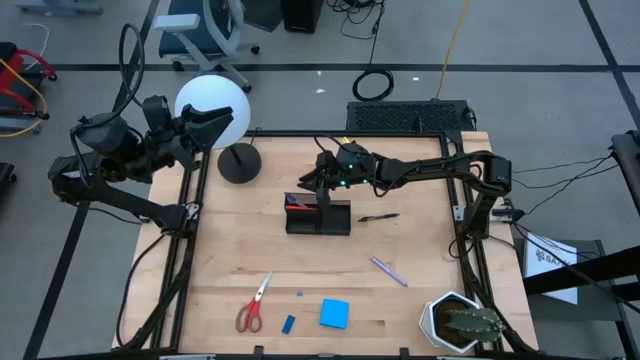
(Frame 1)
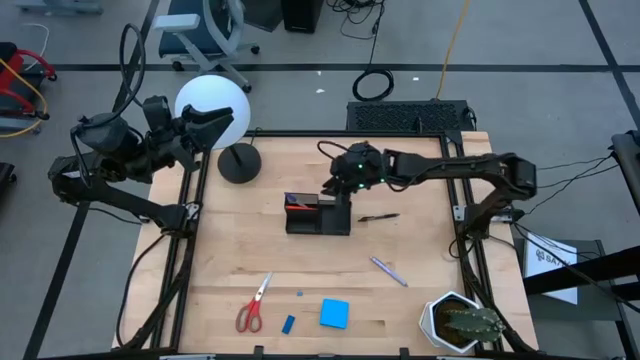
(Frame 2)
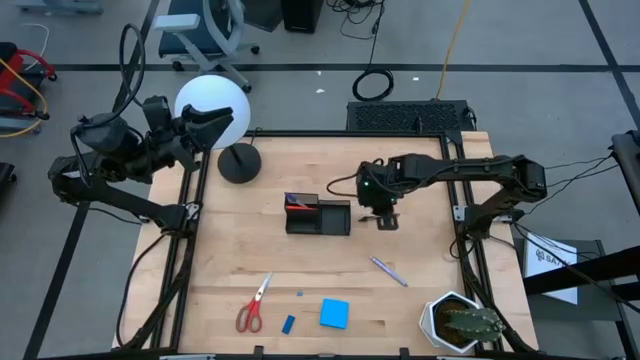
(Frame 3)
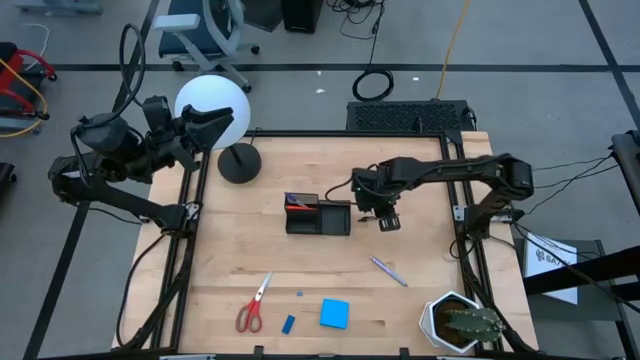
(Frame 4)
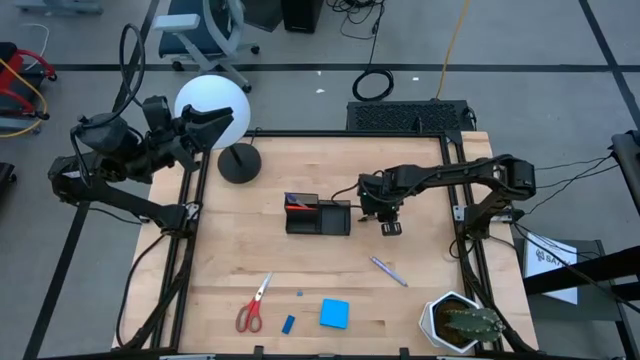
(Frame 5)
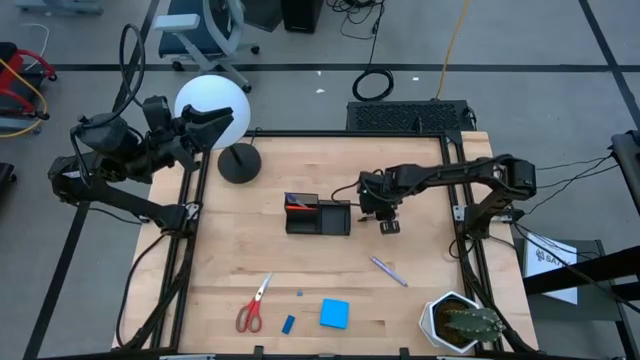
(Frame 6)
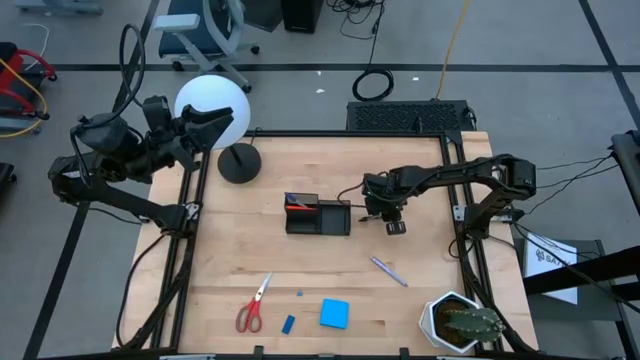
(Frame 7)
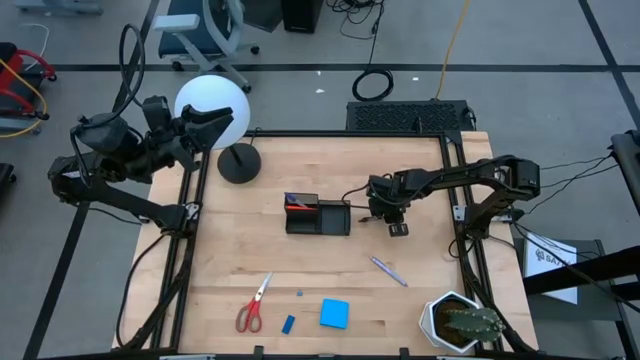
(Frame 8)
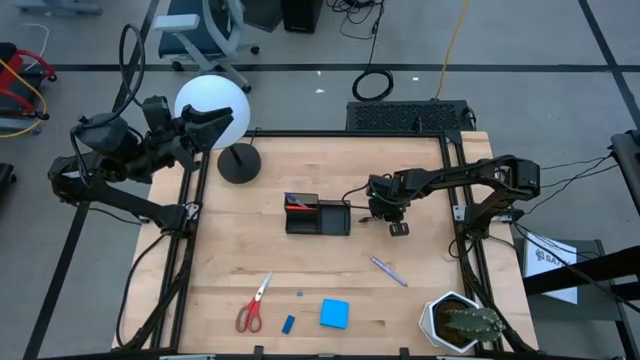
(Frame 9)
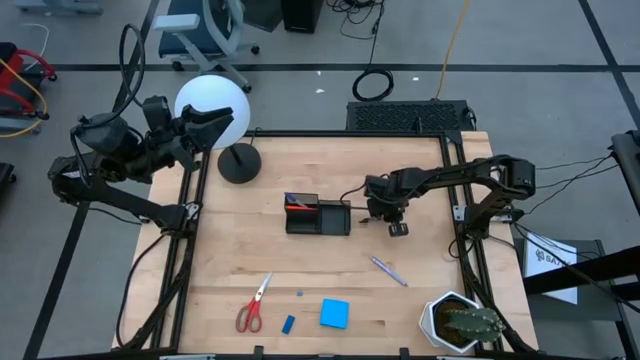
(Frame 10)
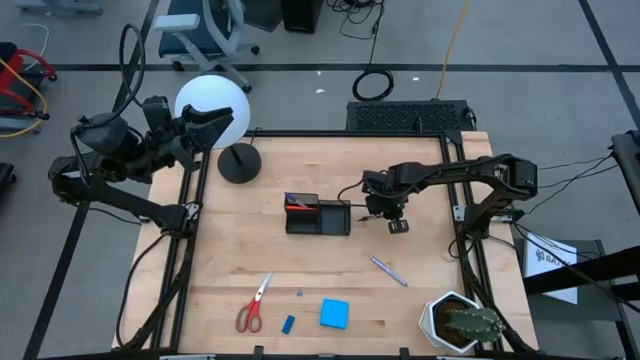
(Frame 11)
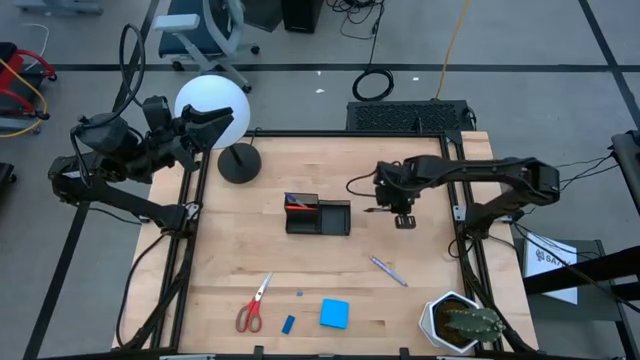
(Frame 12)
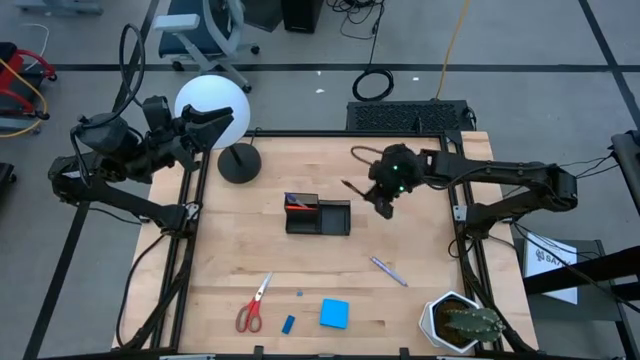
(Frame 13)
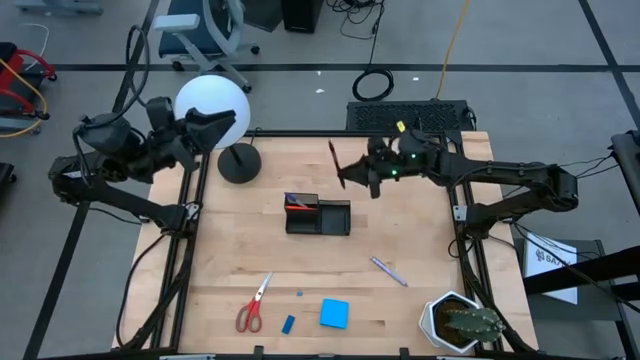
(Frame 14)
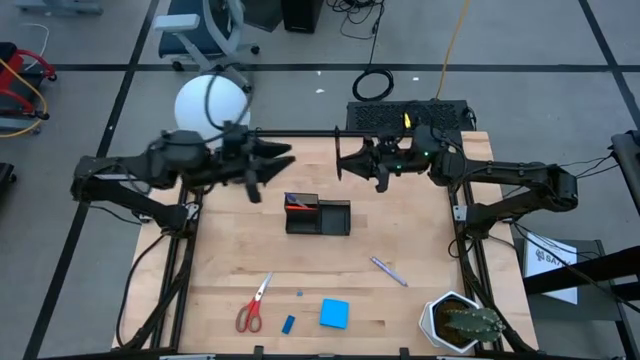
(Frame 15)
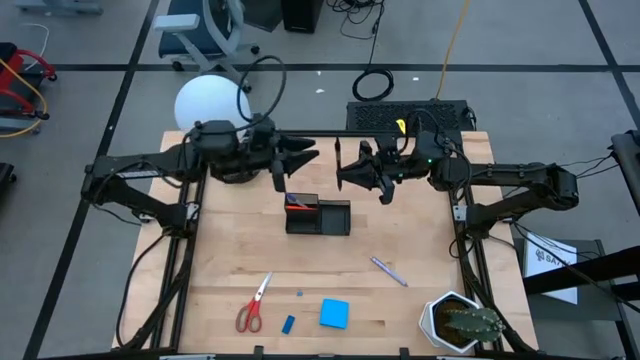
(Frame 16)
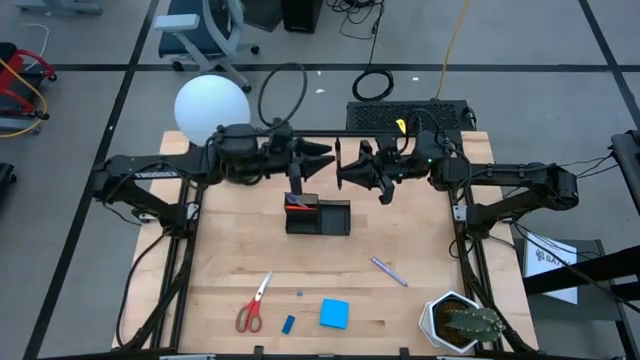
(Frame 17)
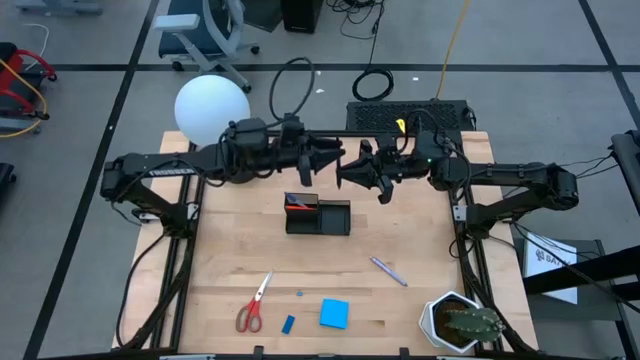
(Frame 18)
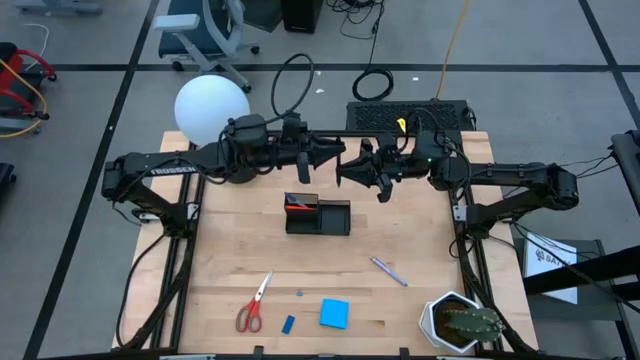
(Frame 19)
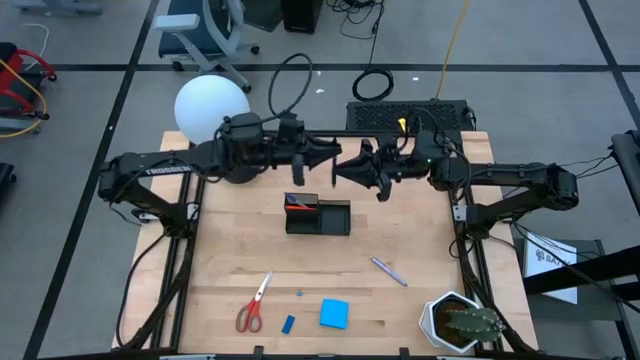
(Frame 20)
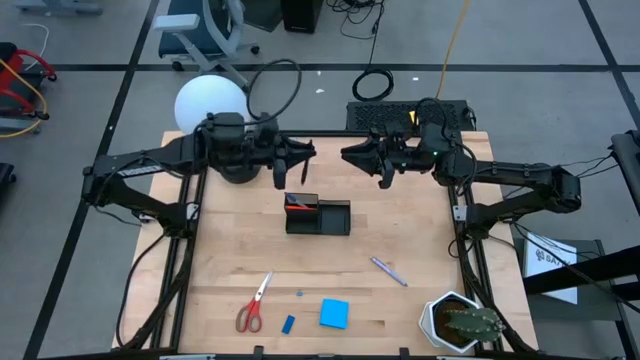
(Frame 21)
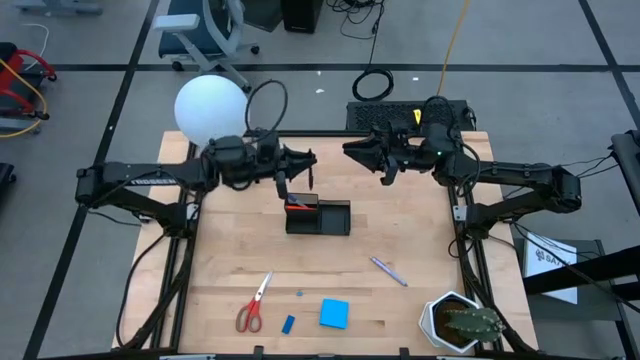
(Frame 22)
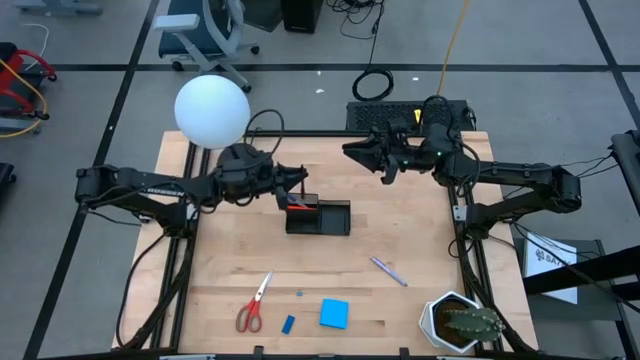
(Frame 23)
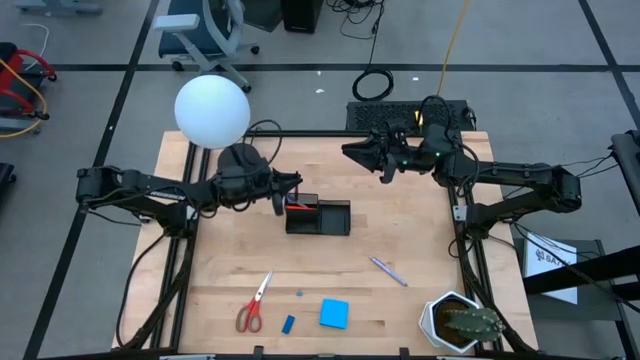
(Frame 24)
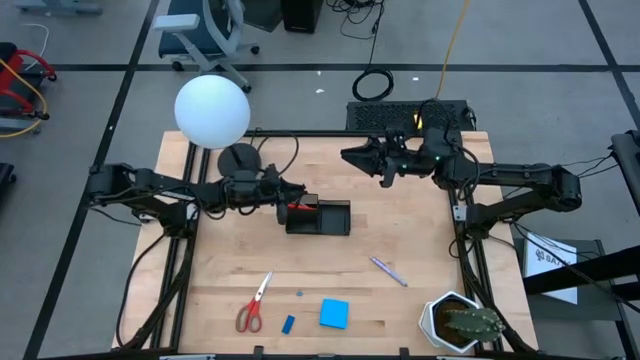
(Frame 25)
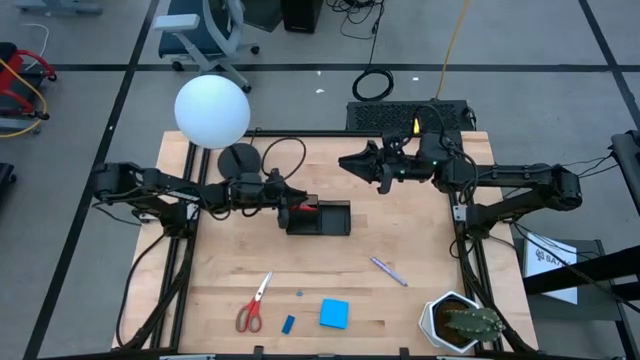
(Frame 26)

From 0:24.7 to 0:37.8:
Task: Pick and place office supplies into organizer
Put the black pen into the desk organizer

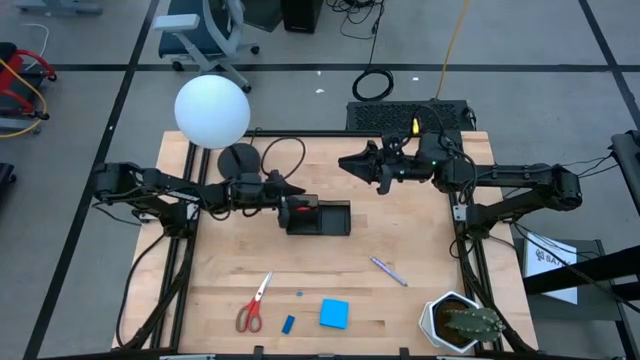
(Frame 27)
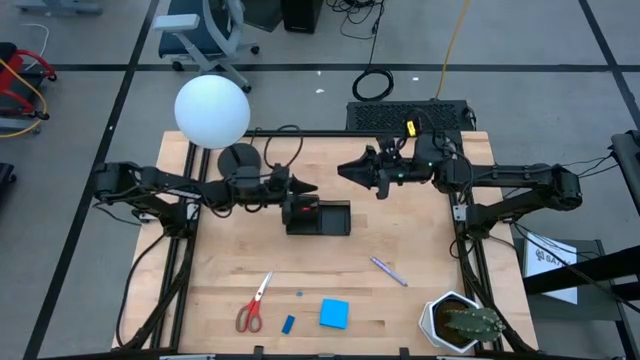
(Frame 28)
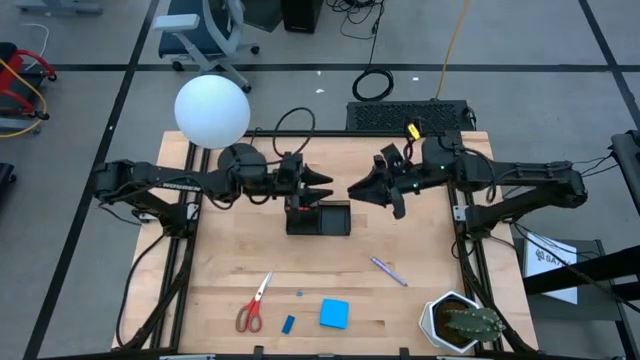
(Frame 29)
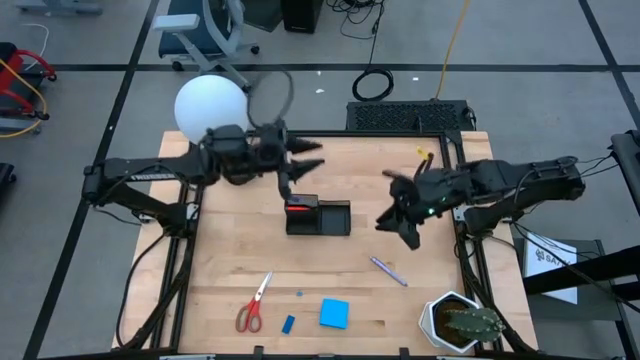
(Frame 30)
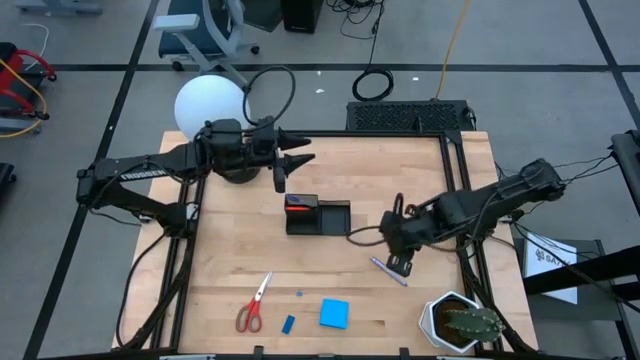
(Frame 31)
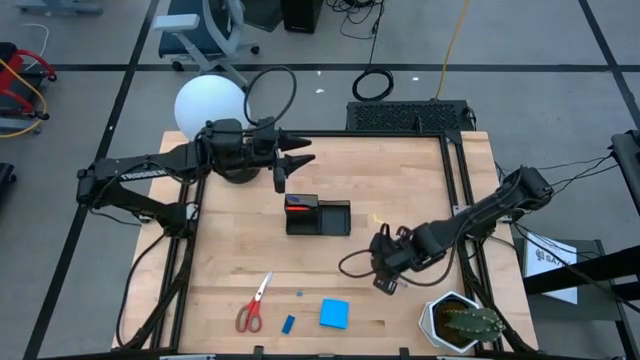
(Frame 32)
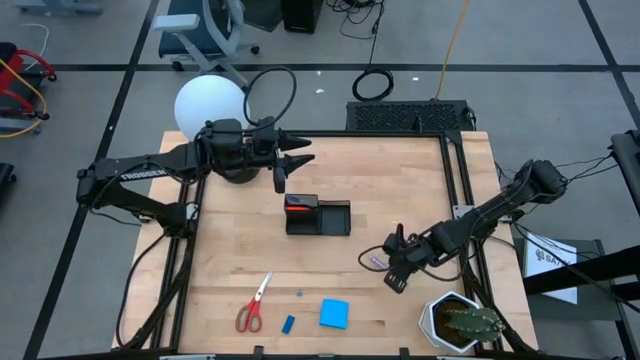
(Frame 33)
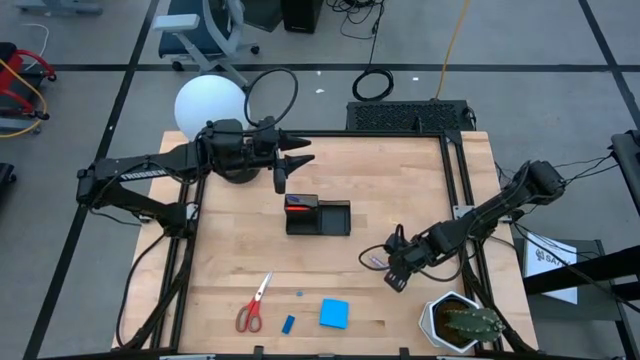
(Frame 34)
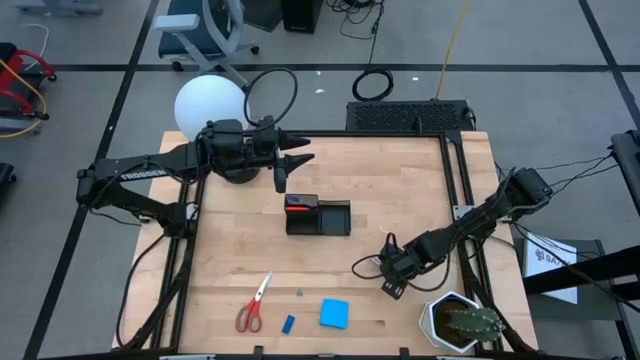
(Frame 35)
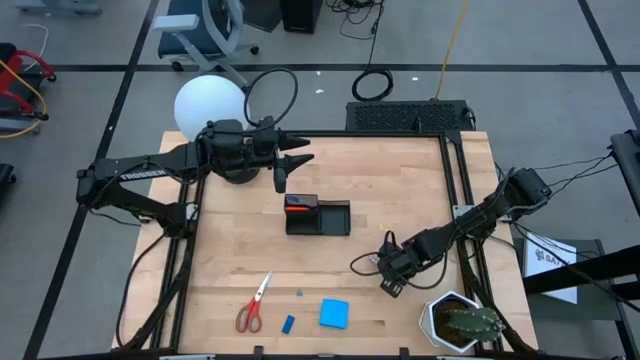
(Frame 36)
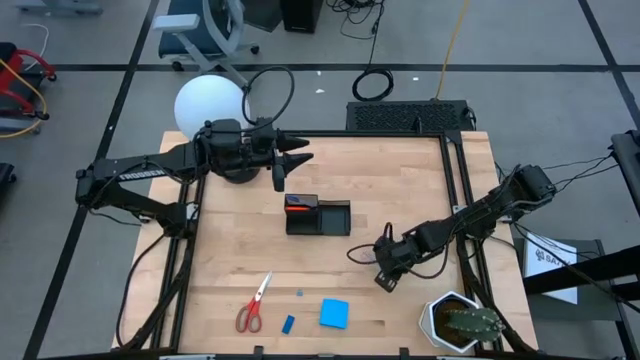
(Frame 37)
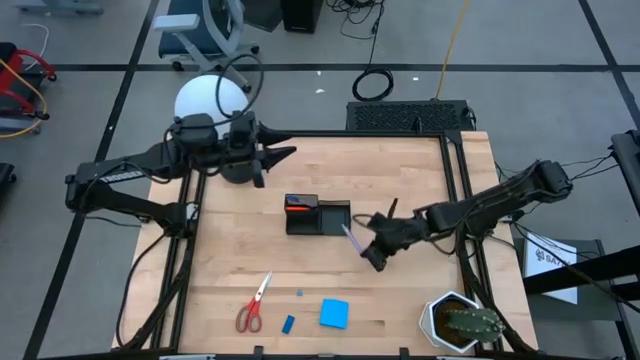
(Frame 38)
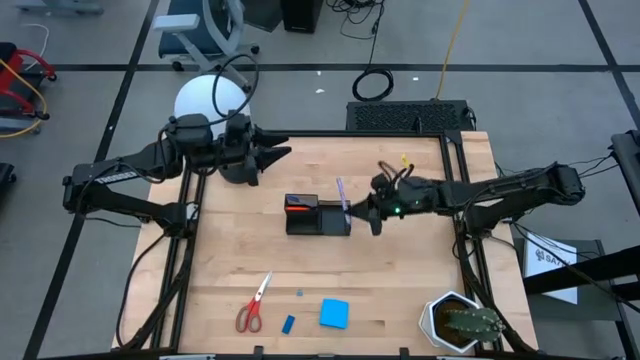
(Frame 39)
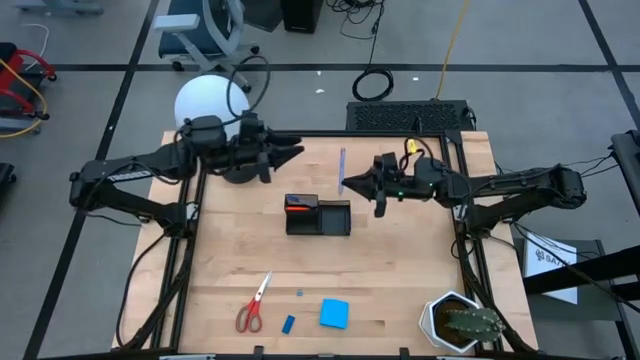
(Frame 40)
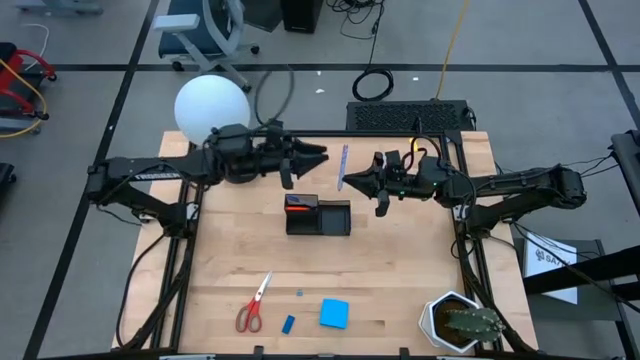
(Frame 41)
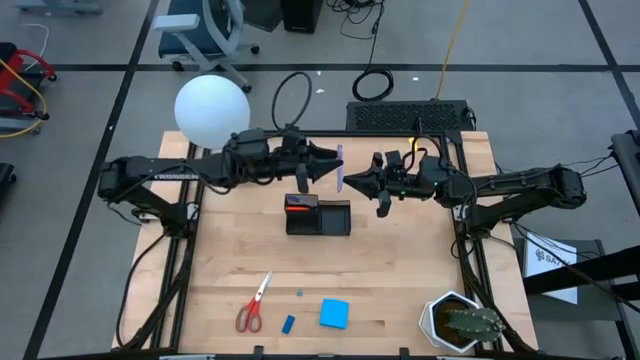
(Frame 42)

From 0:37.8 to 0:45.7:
Put the purple pen into the desk organizer

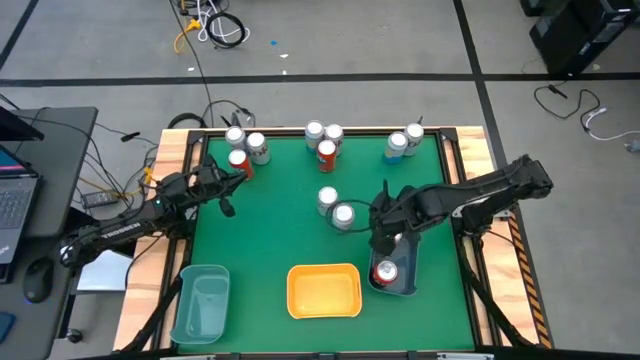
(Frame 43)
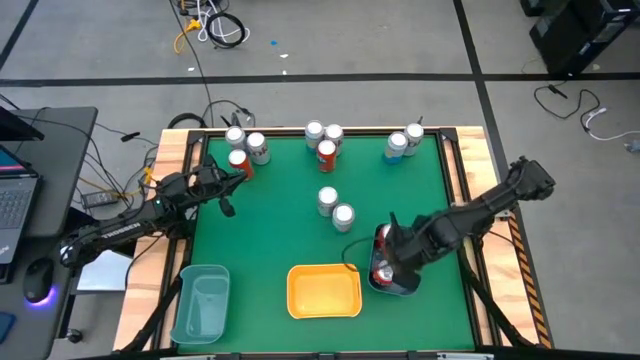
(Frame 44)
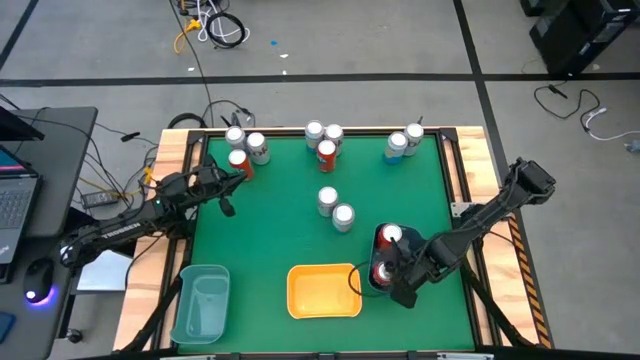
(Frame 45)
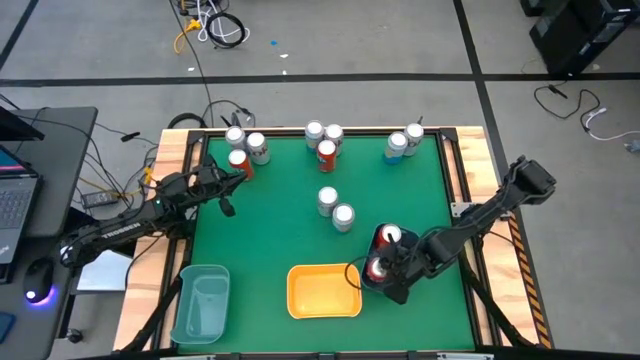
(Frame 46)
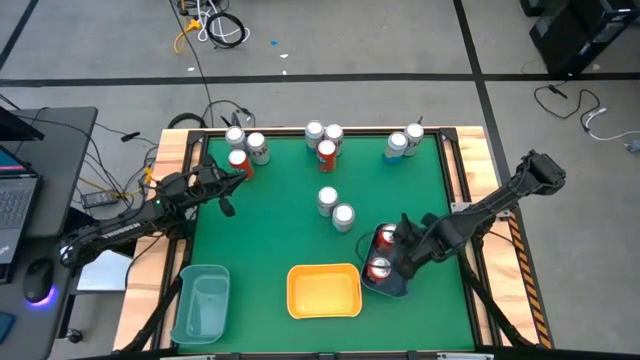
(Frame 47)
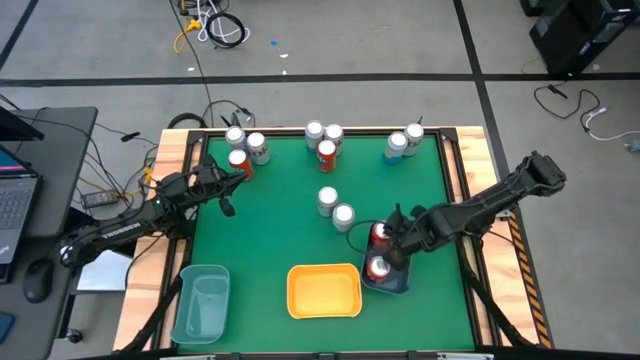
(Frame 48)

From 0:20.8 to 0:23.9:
Task: Sort soda cans
Adjust the red soda cans in the blue bin
